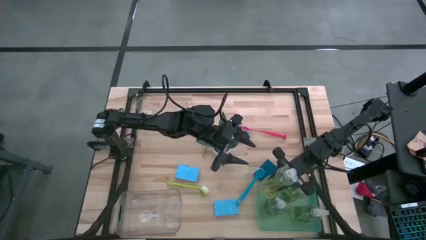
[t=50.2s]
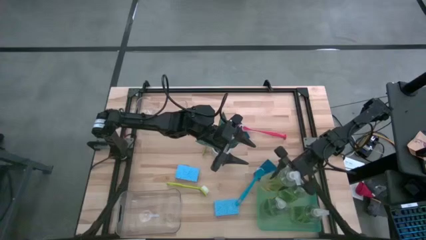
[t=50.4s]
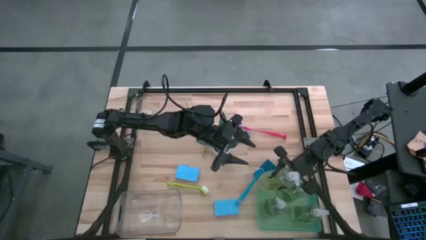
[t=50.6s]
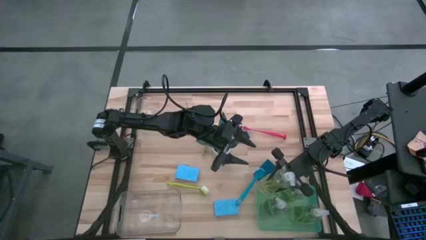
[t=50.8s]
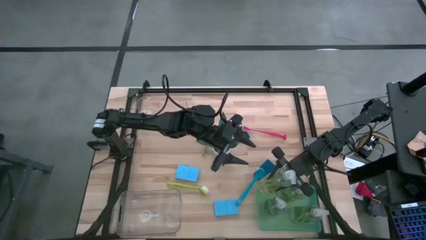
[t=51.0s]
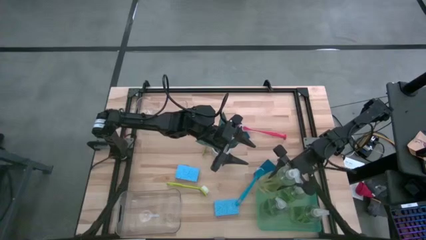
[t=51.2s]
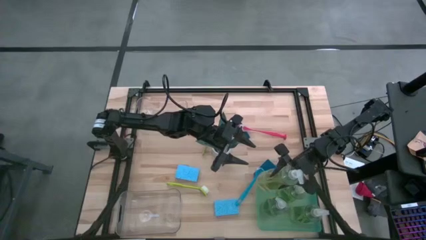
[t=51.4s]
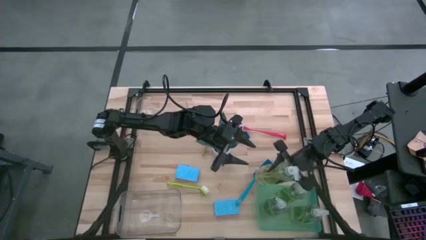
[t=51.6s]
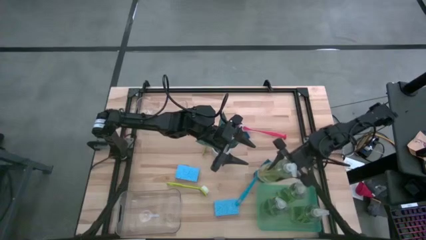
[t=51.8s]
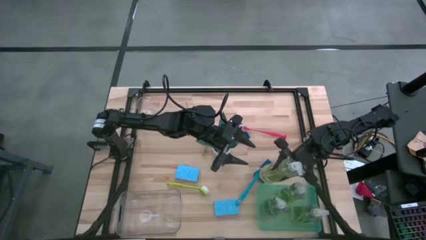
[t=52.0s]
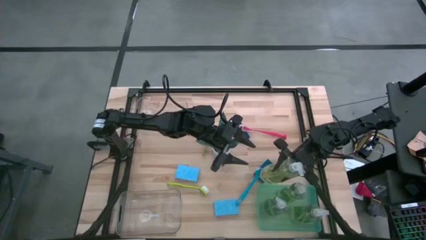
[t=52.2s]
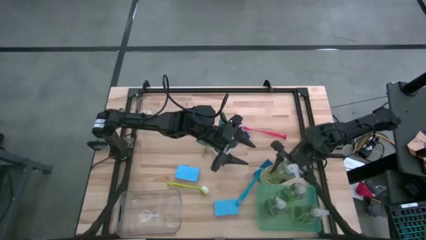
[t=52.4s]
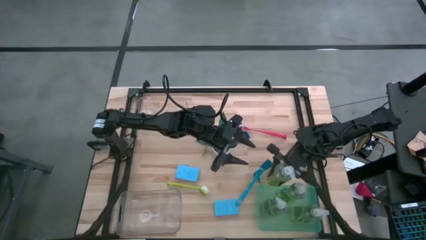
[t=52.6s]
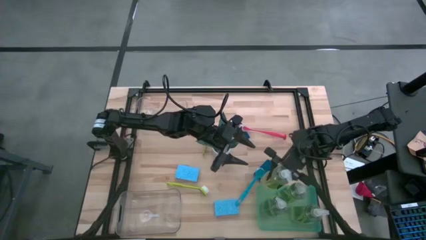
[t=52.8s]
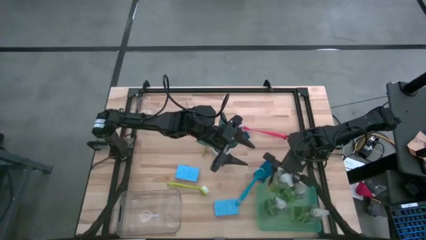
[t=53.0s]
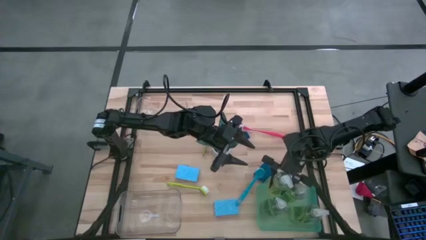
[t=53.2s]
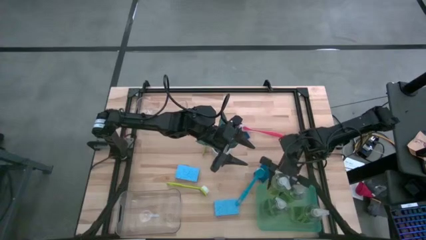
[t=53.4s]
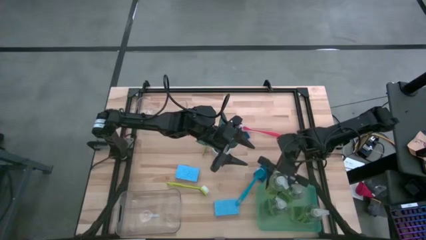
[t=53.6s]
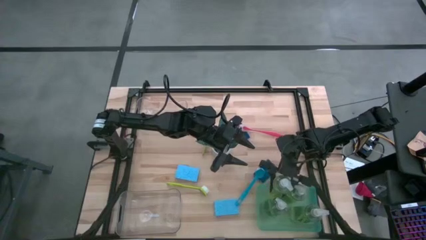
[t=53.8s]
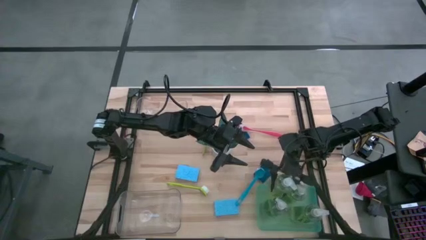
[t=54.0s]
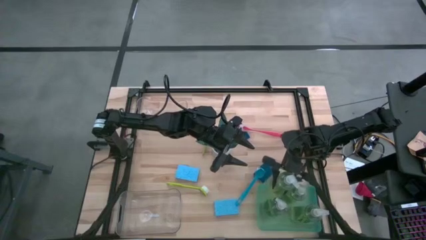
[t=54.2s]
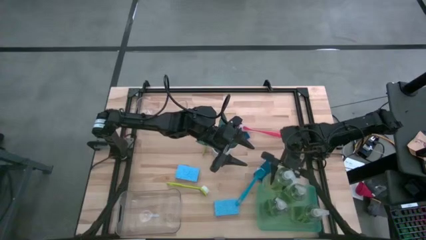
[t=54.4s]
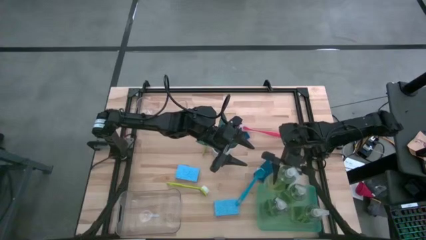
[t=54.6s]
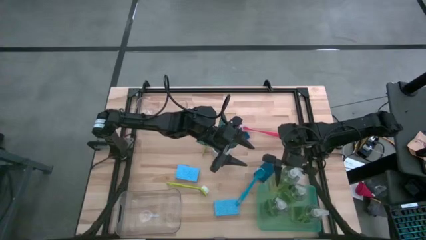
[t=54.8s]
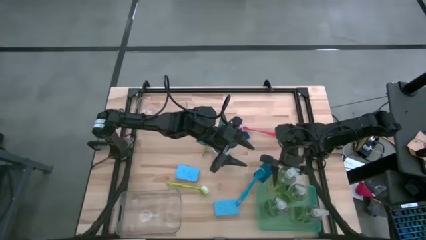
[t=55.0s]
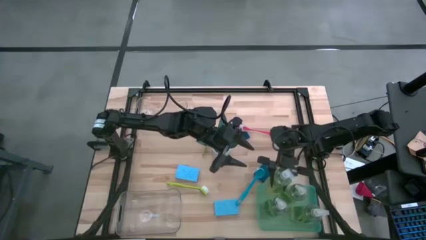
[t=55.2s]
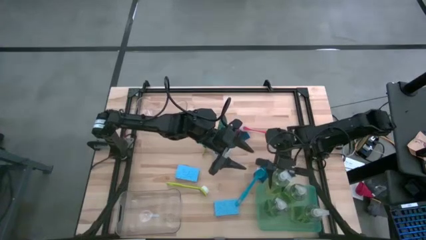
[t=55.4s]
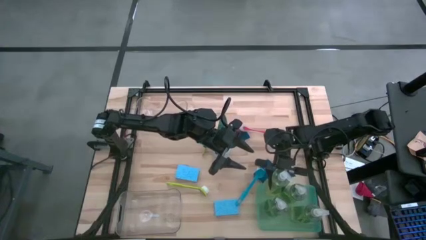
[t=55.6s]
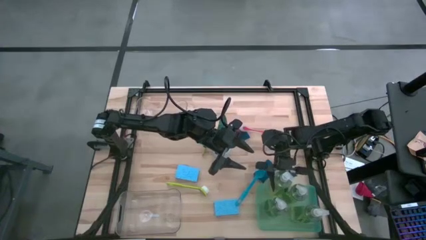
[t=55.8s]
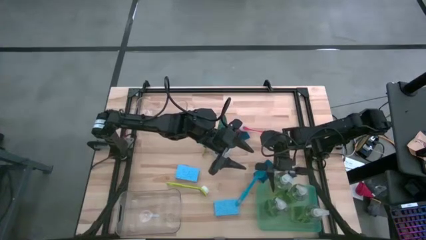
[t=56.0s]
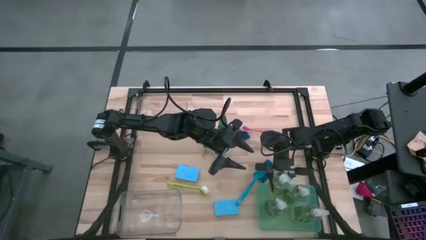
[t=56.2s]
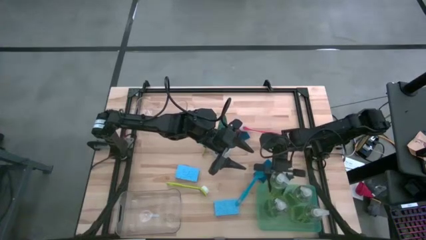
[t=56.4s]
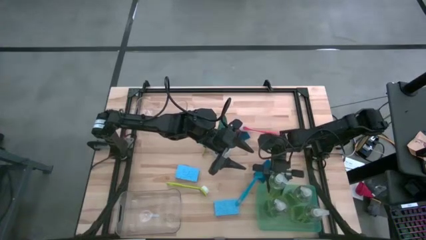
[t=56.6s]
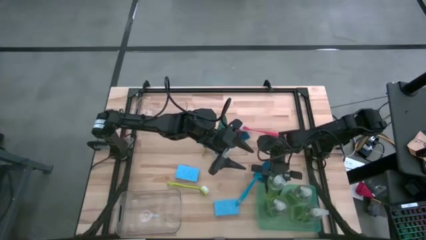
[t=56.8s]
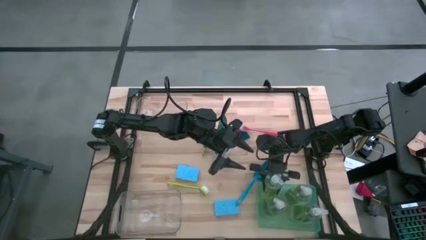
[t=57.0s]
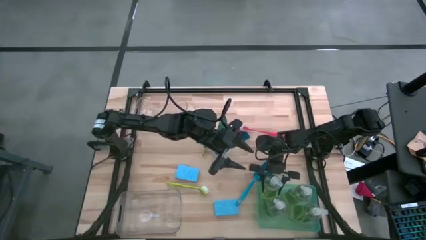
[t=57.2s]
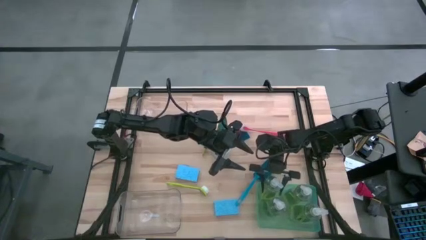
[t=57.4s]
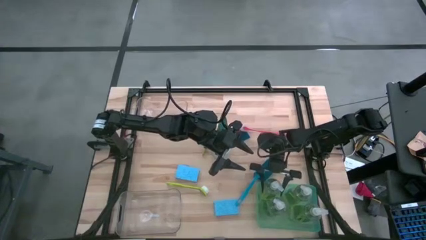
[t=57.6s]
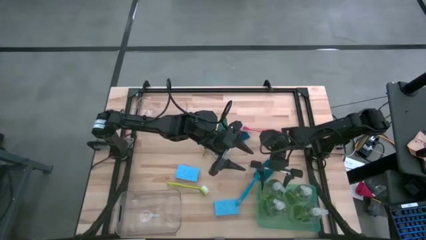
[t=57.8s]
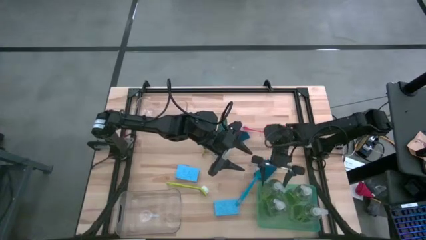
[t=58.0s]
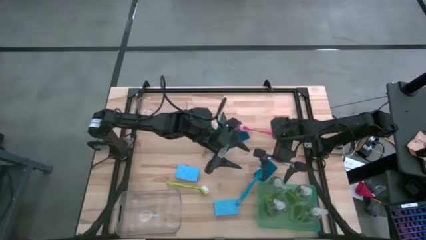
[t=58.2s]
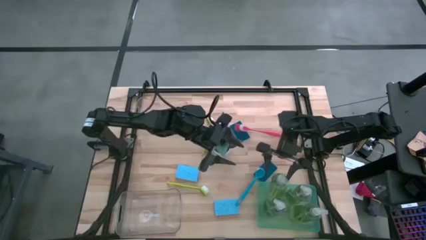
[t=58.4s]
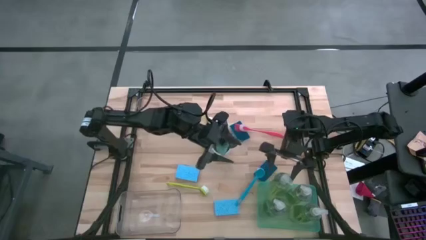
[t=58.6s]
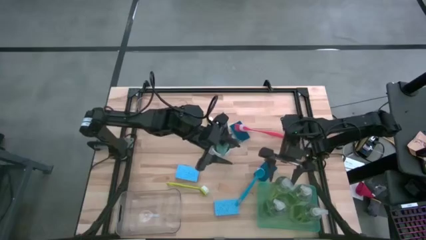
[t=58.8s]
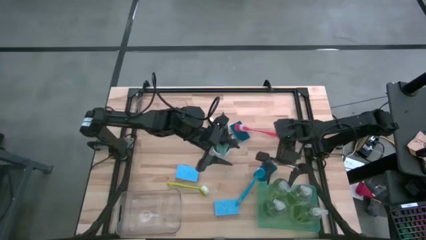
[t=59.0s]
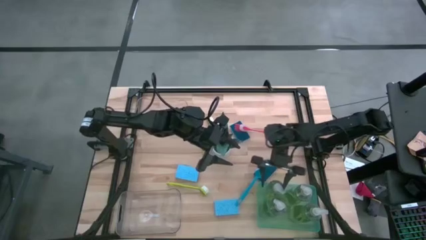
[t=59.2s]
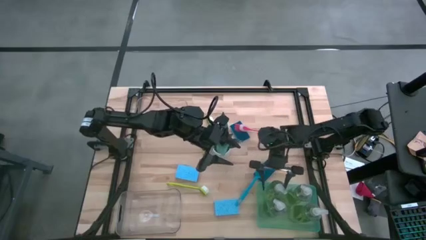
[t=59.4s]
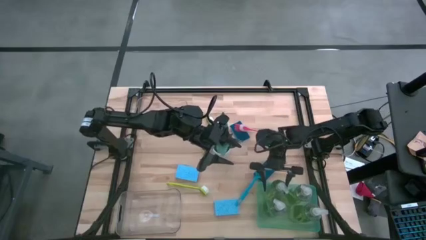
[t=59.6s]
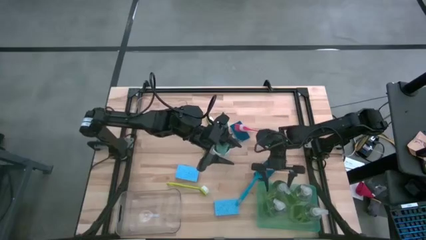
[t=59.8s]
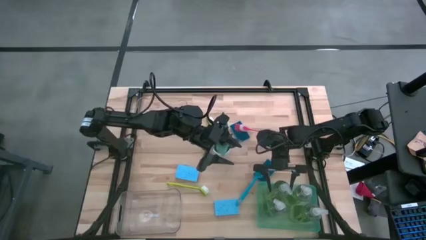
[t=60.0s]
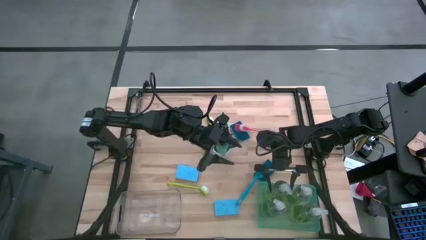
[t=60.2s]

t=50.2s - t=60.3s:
Task: Pick & Place Kitchen Sink Supplies
Put the yellow dish soap into the green bin

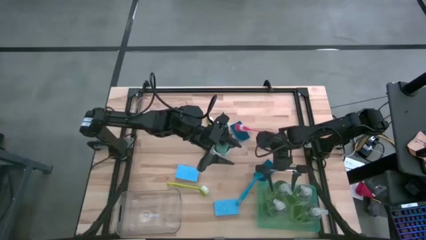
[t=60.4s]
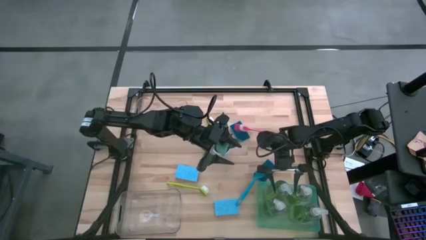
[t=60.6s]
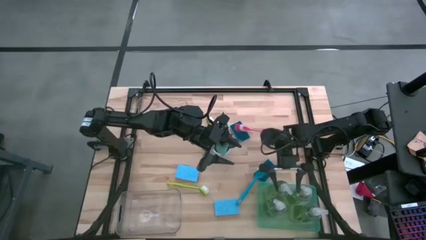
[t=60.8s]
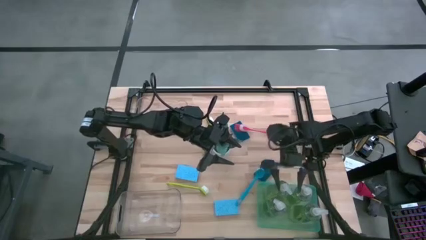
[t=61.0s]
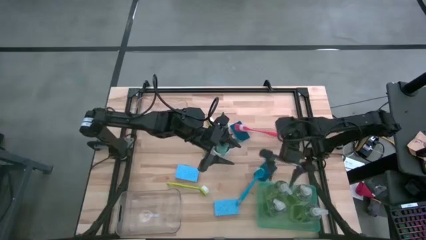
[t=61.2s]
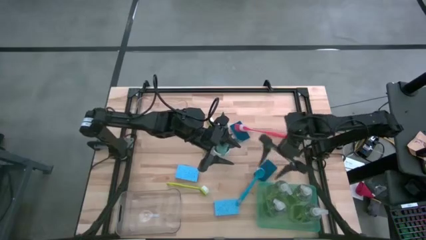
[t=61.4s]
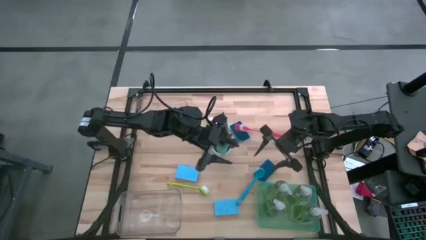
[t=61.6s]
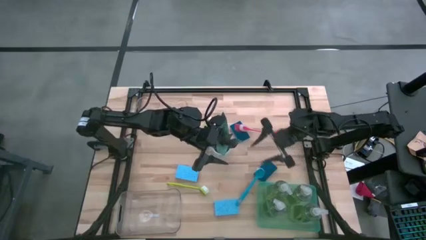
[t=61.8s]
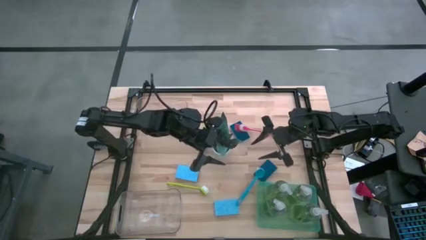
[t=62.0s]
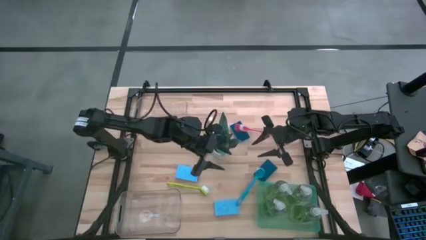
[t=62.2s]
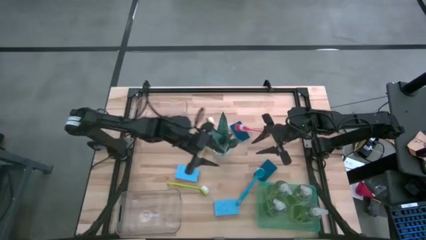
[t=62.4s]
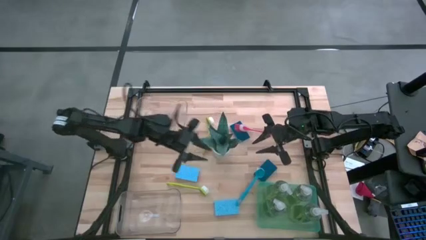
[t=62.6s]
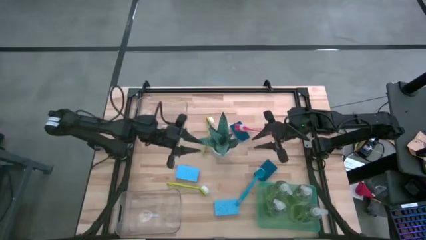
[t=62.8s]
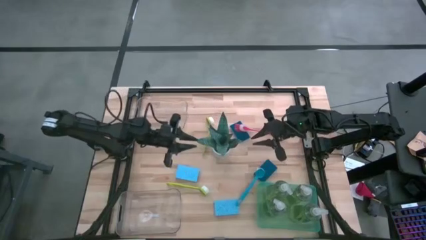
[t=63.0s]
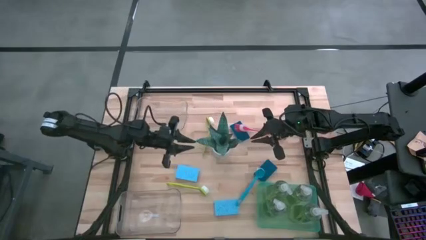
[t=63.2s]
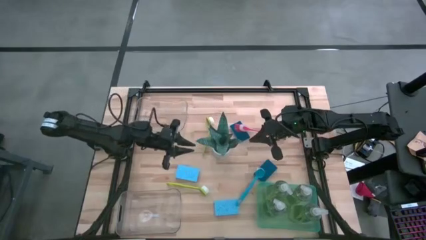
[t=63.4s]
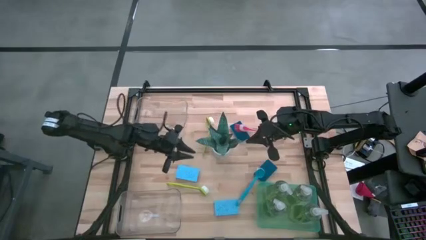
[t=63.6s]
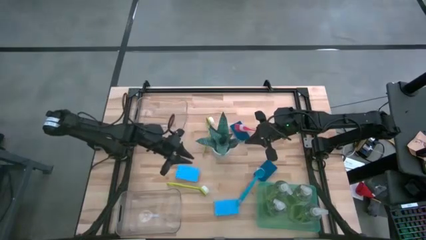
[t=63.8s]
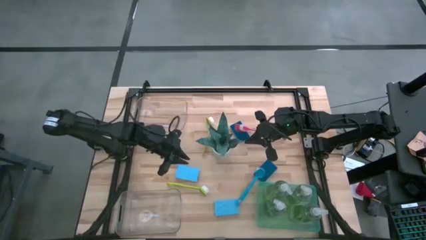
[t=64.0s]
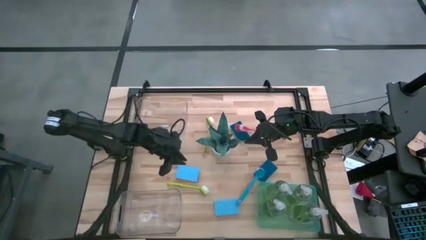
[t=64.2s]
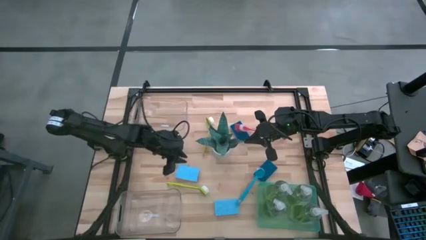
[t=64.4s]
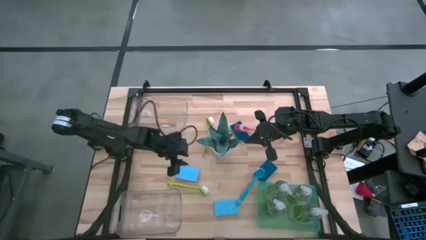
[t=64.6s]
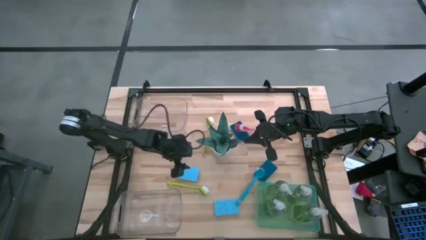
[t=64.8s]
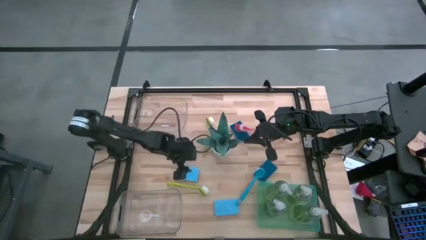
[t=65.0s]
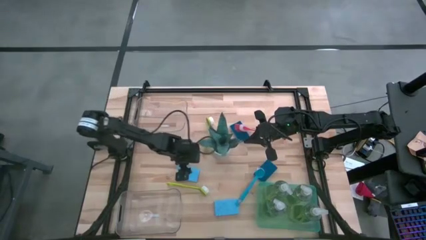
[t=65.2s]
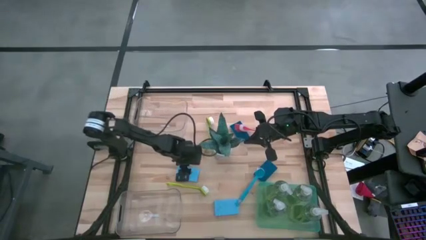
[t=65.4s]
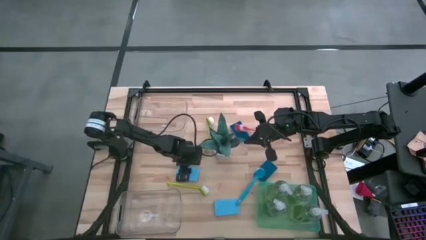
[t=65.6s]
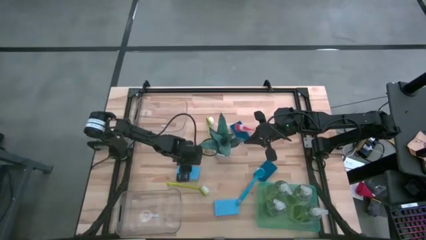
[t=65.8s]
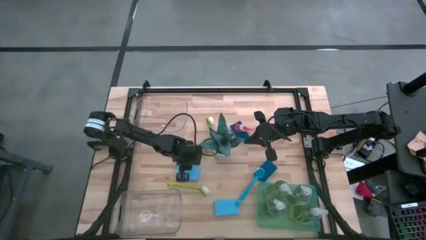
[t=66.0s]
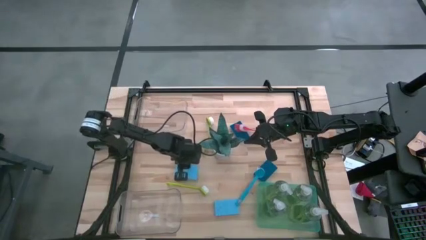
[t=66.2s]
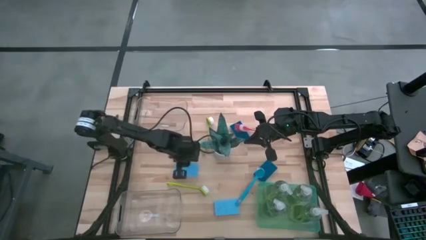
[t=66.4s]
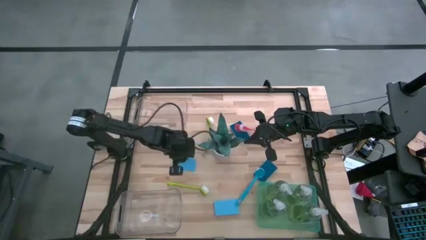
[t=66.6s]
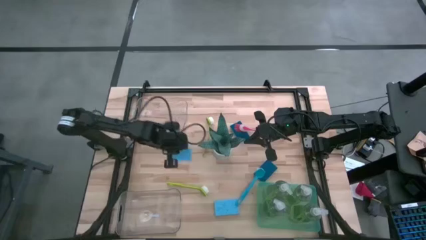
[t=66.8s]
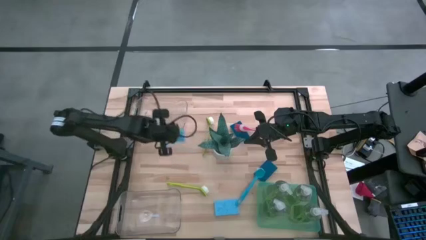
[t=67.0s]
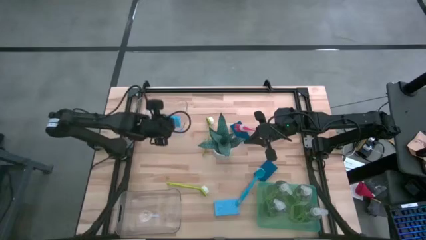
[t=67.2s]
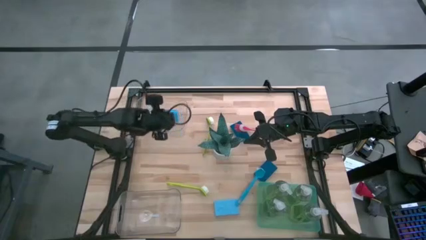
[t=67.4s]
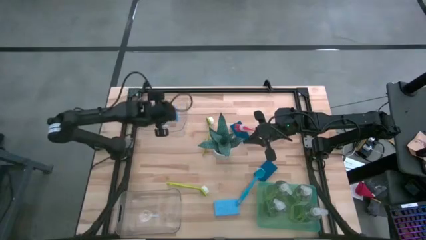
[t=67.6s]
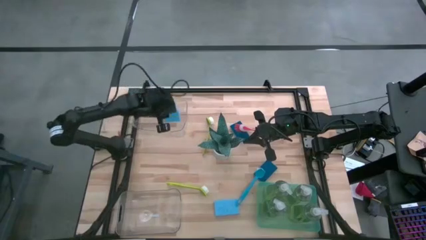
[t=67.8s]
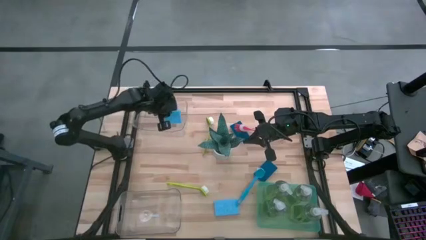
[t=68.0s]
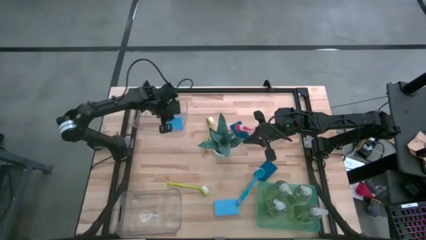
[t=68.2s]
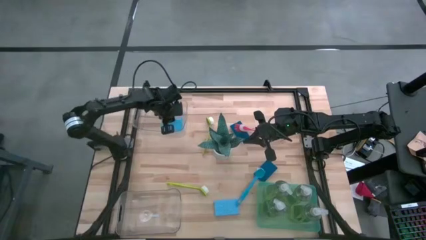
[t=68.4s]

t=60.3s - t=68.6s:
Put the blue sponge into the top transparent bin
